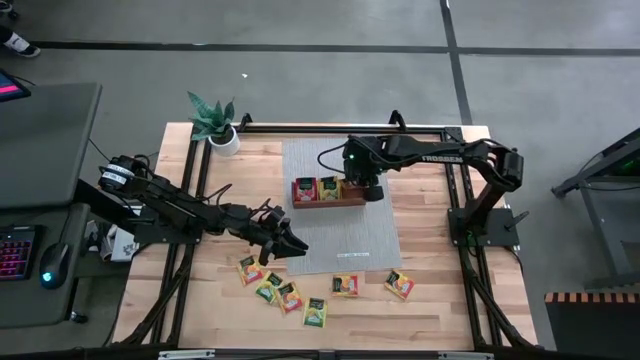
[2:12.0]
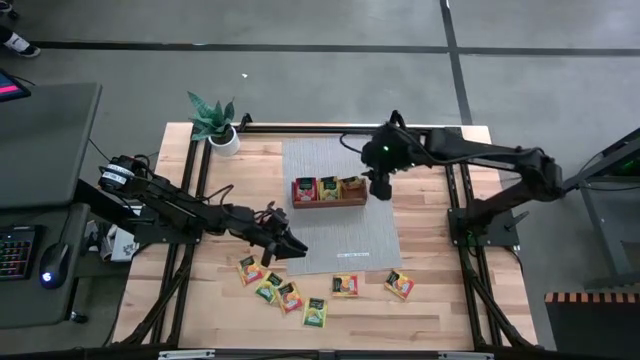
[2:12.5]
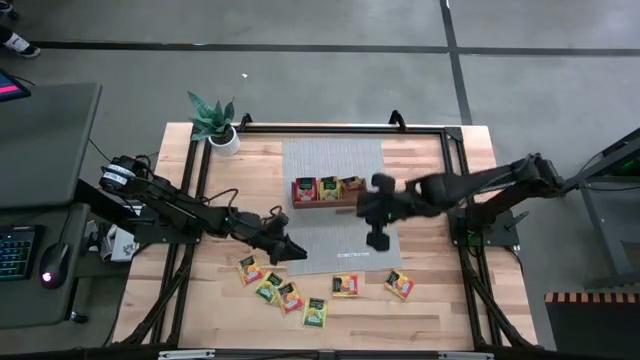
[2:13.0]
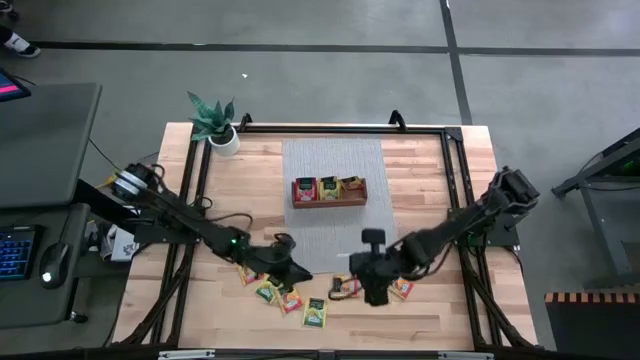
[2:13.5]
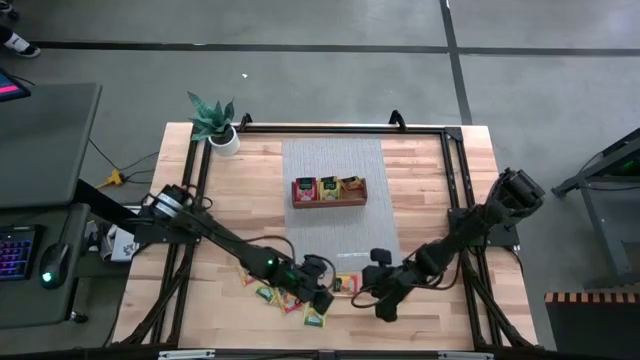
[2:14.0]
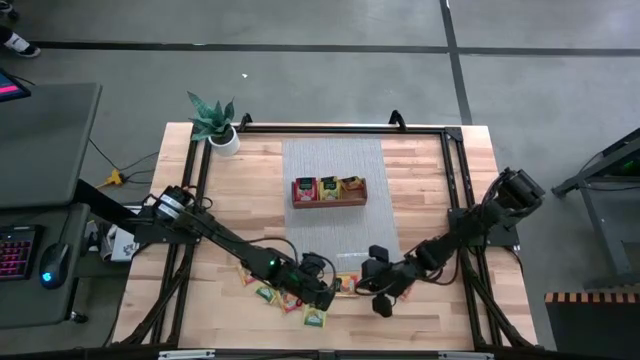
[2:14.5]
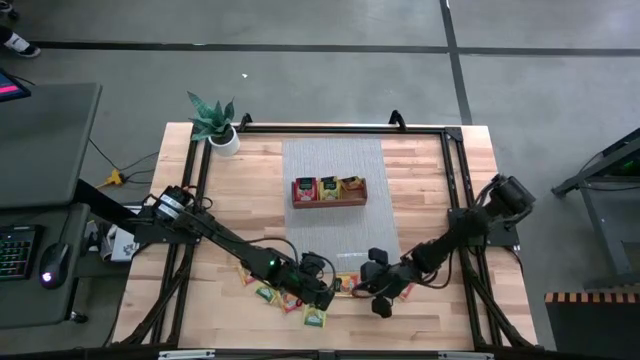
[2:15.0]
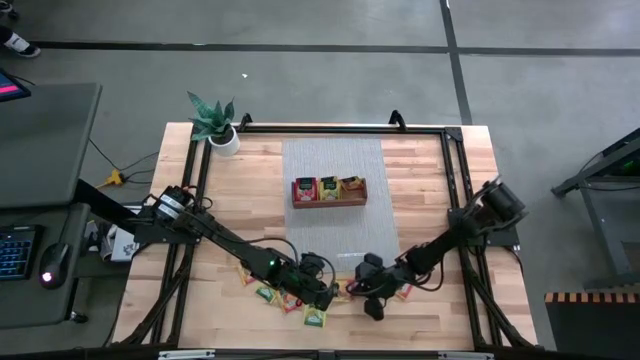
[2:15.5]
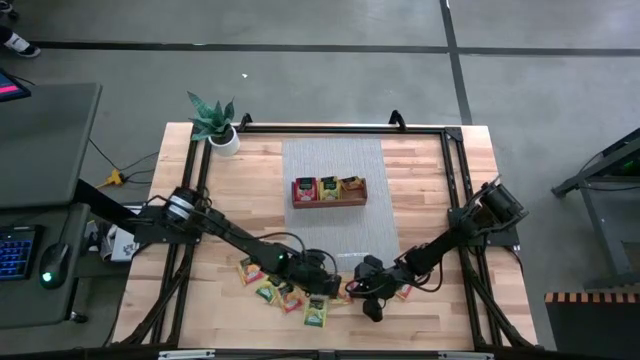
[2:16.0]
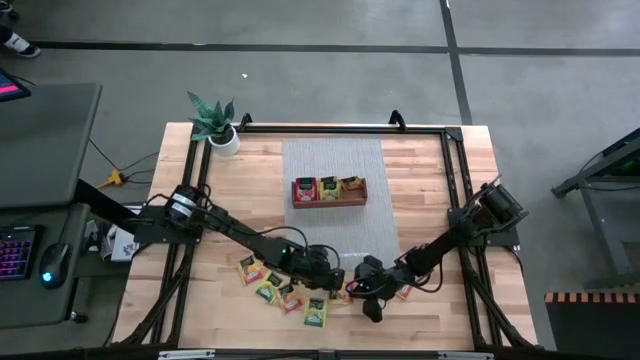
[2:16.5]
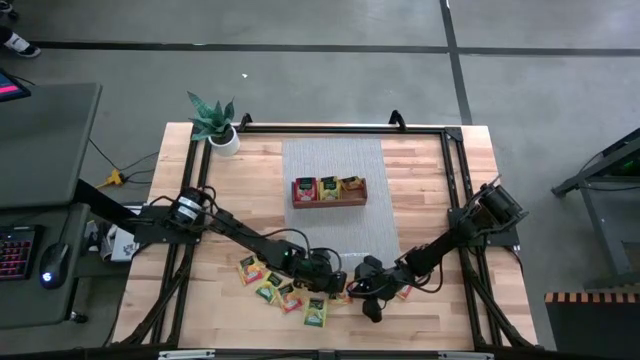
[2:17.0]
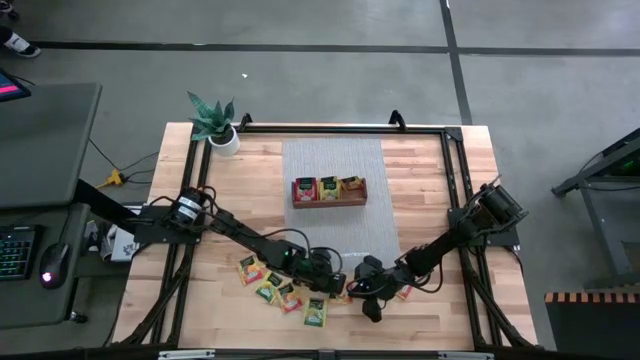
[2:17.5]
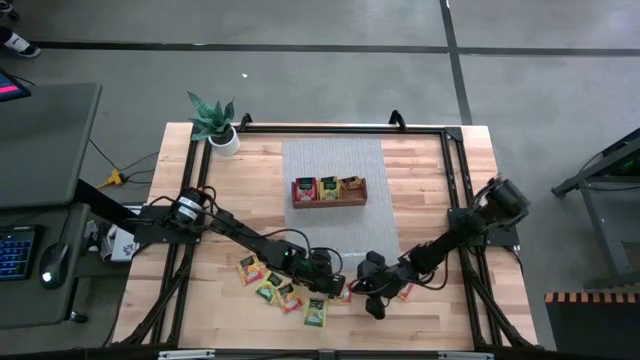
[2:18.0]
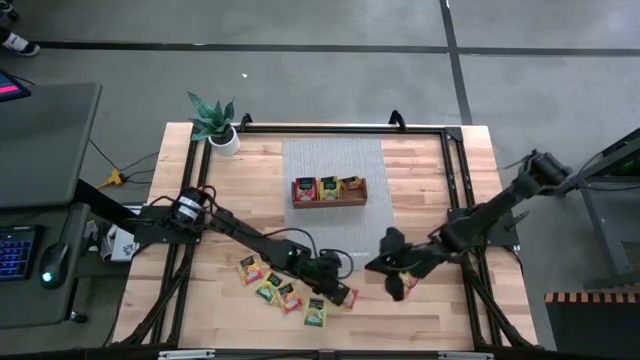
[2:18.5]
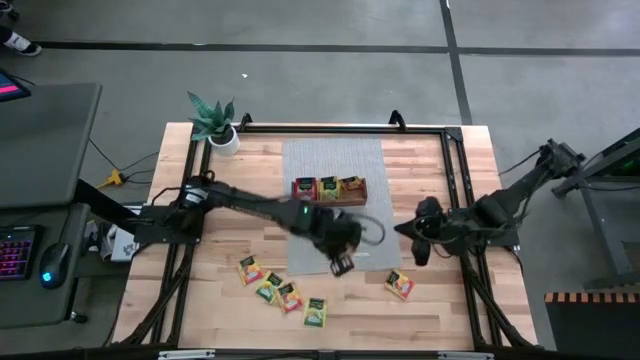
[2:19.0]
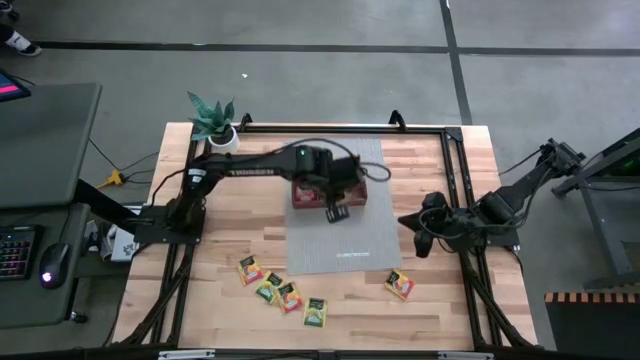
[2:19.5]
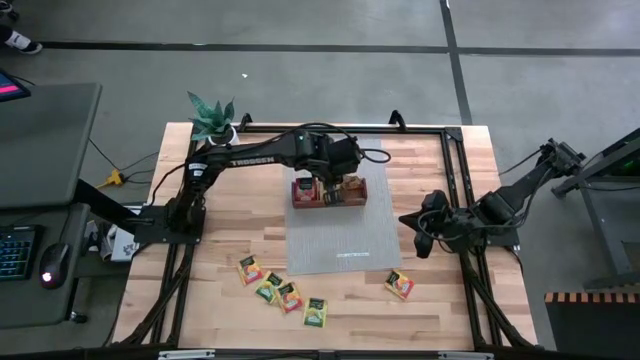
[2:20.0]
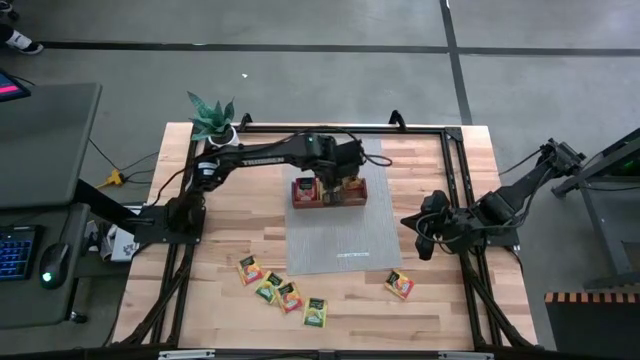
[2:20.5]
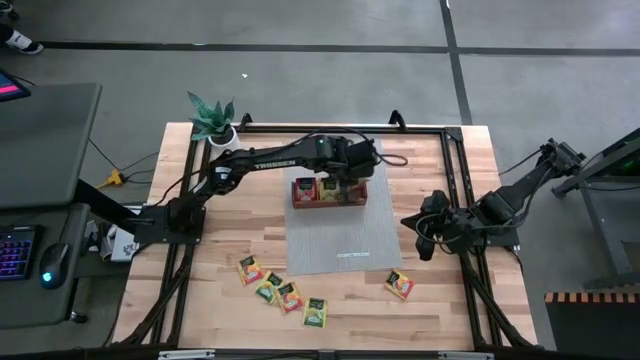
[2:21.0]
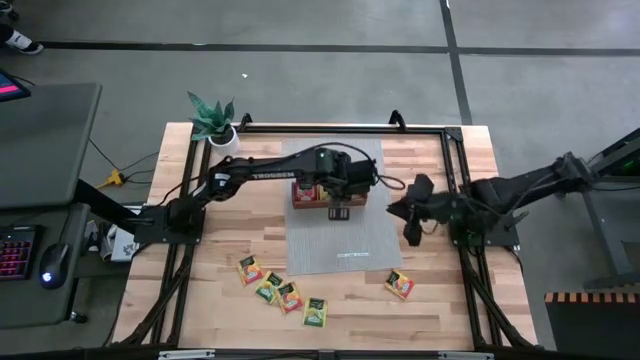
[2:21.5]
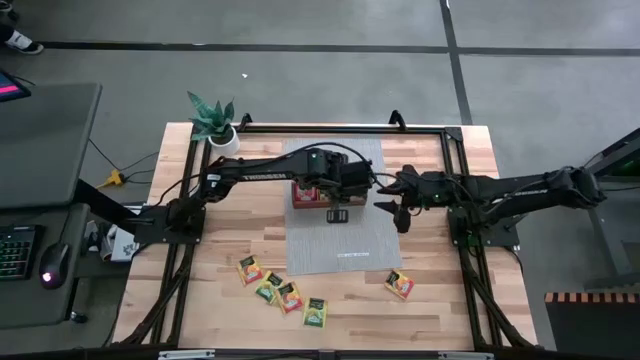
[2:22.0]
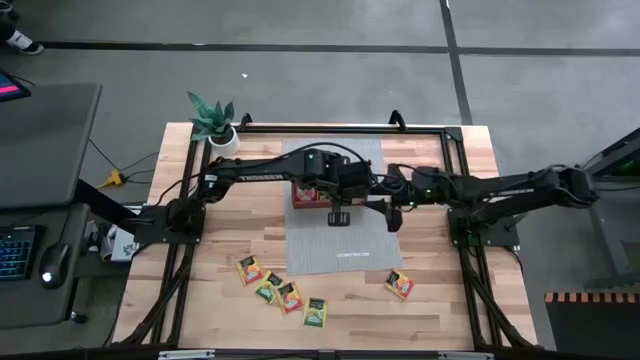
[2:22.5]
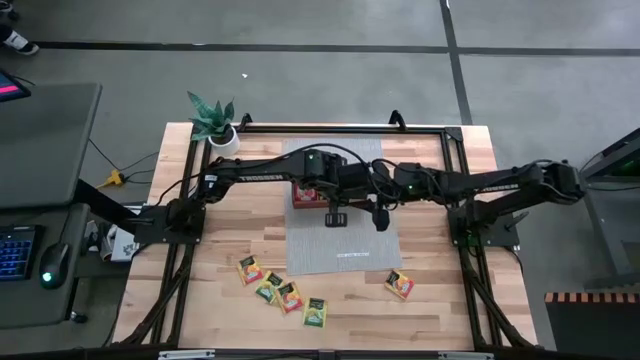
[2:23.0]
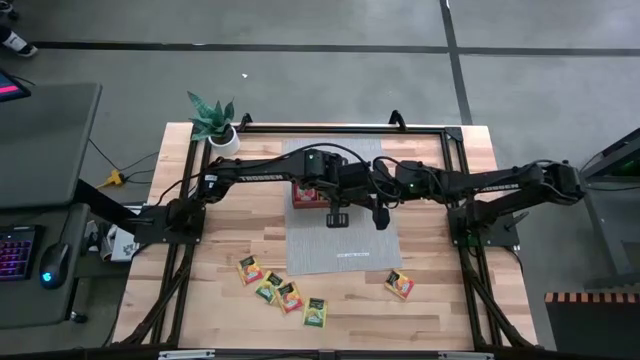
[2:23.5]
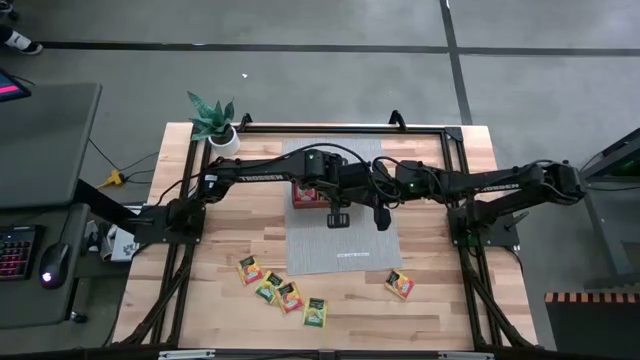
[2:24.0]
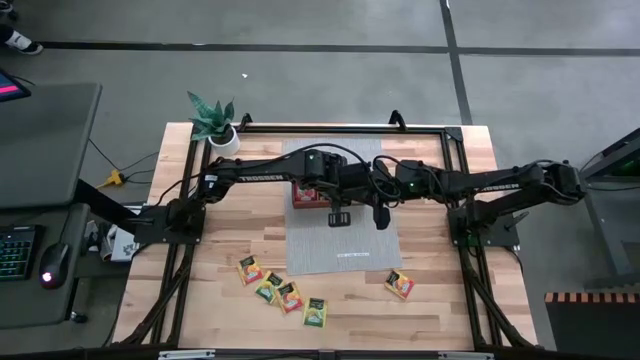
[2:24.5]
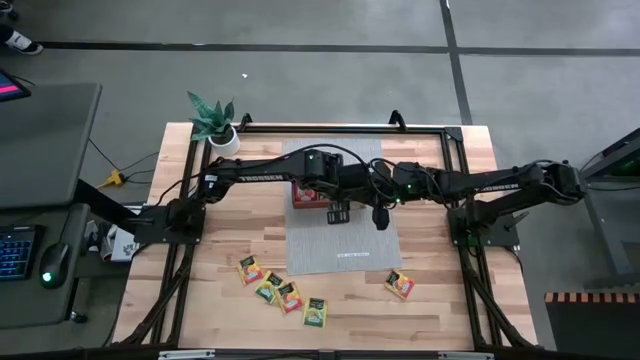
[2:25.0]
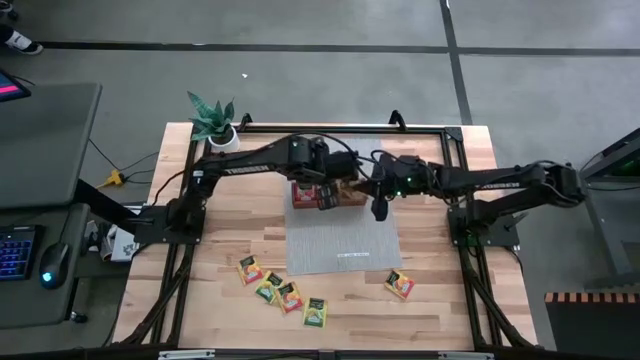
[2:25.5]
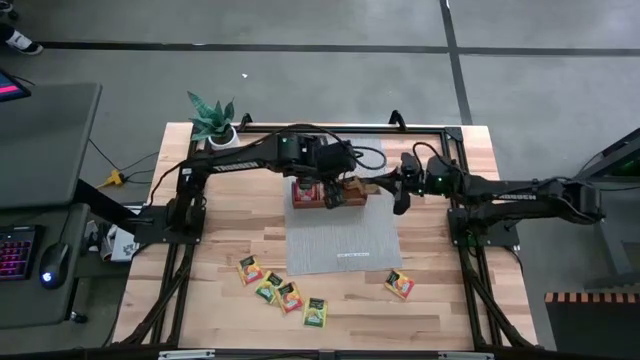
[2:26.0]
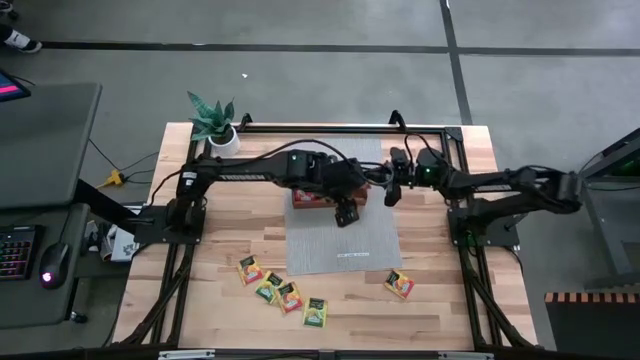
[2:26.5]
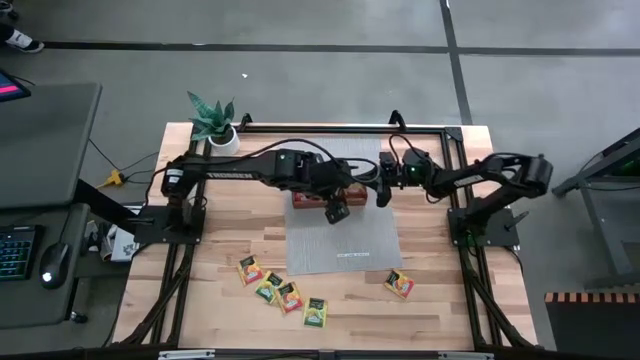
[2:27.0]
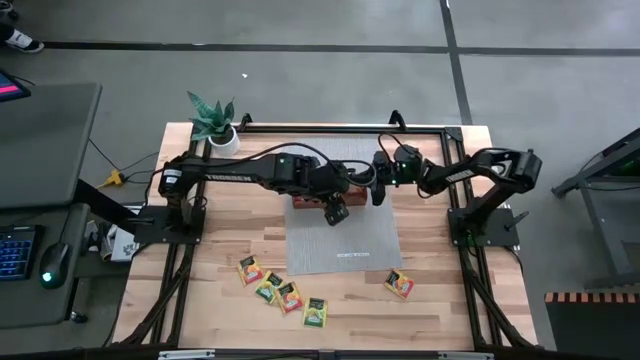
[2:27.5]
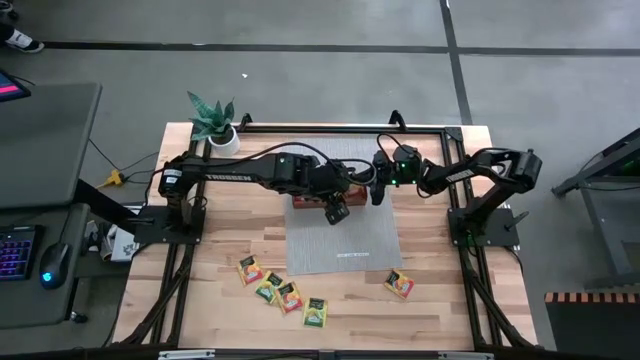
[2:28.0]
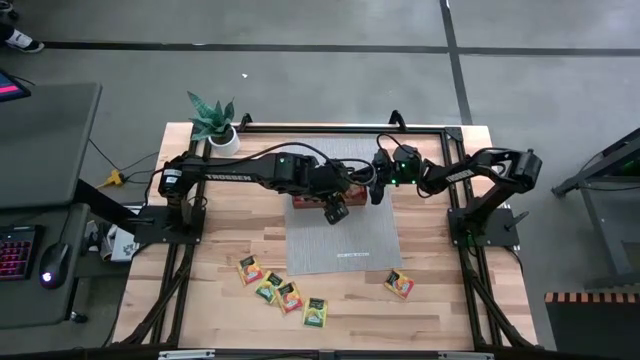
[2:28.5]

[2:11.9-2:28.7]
Task: Pick & Place Tea
Put the orange tea bag into the right section of the wooden organizer

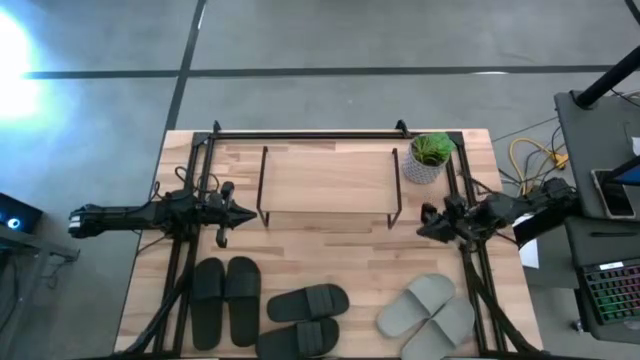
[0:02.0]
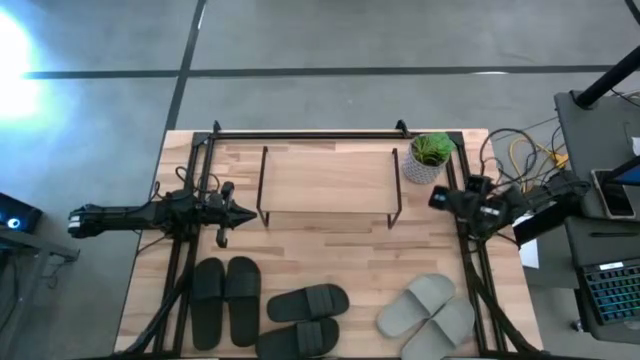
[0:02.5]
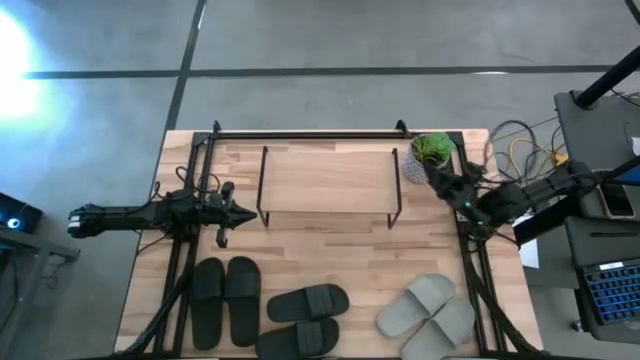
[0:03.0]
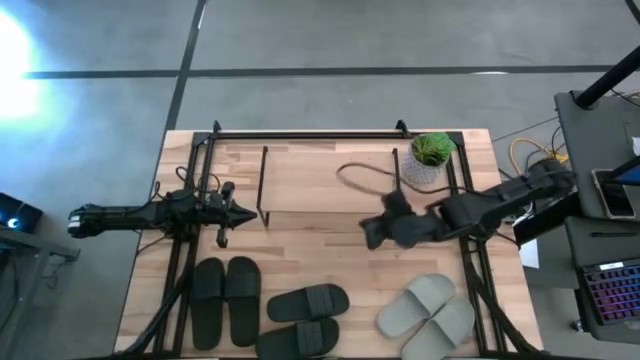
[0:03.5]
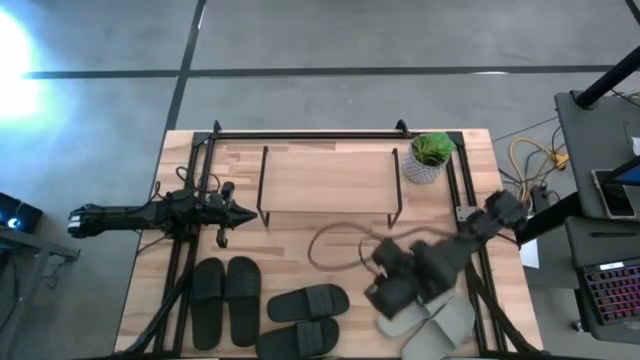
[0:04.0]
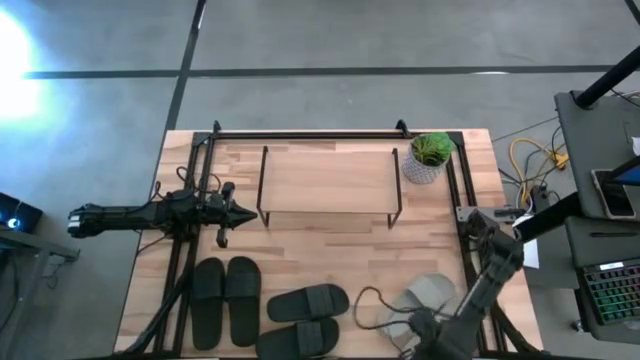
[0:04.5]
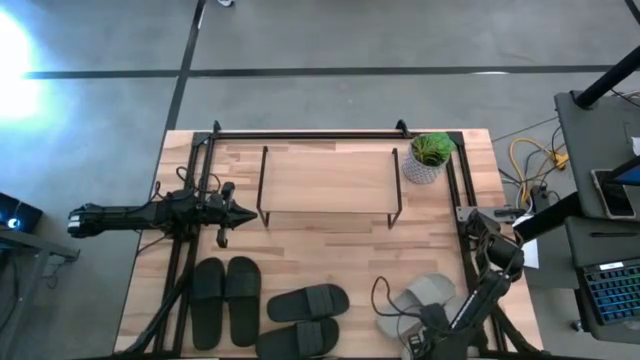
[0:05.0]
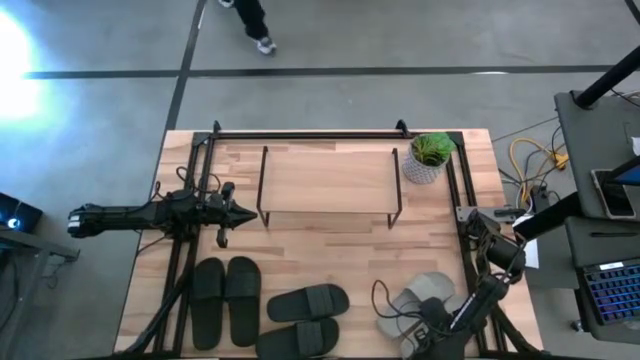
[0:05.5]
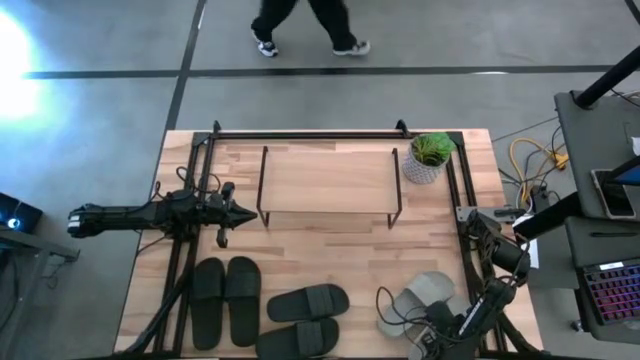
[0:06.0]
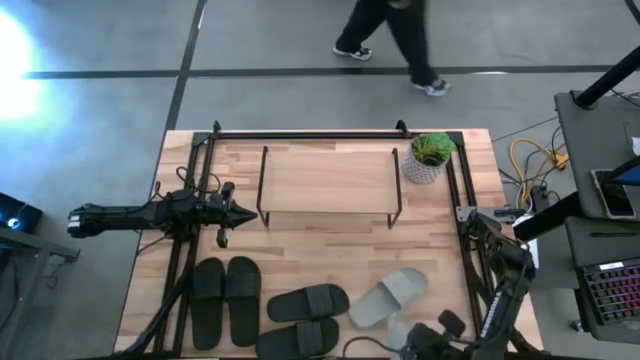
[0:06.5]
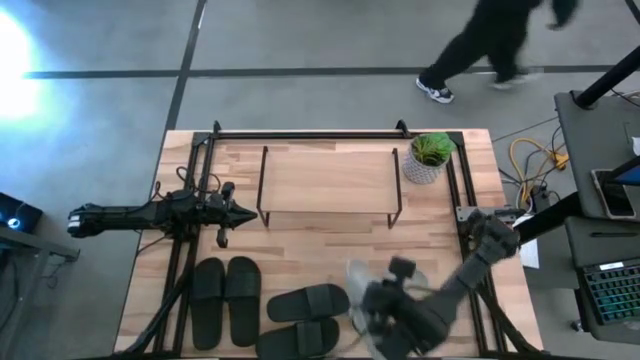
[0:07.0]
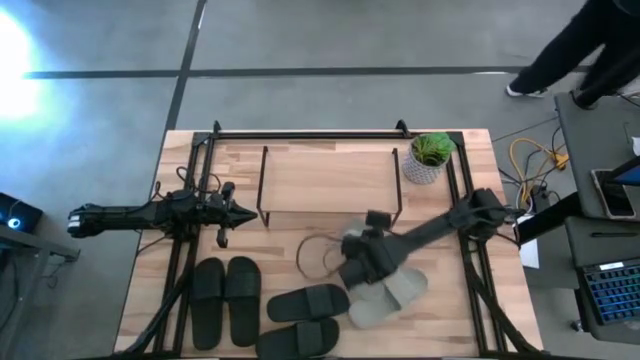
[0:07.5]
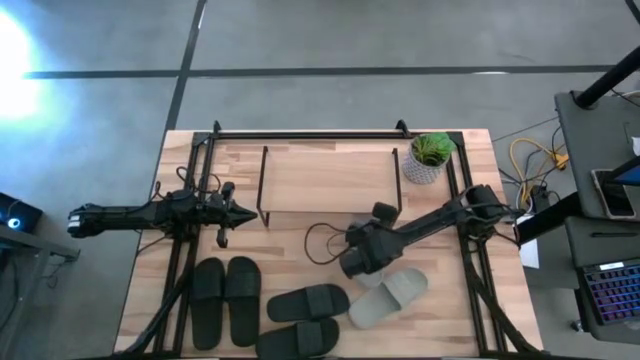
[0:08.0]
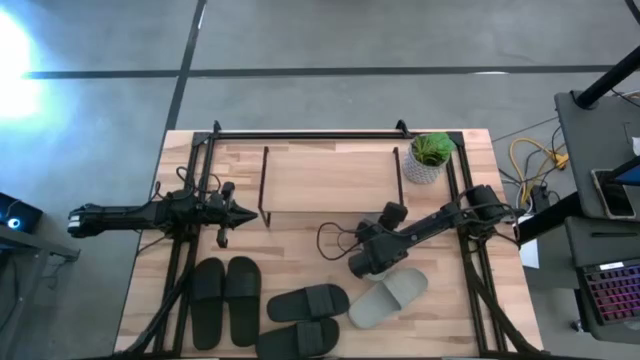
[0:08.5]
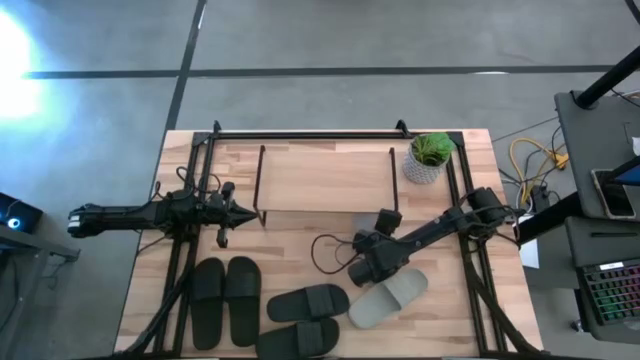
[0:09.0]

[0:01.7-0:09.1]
Task: Pick and place slides into the shelf
Put the bottom grey slide under the shelf
